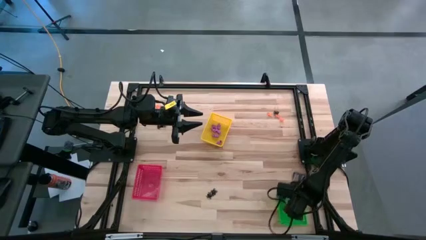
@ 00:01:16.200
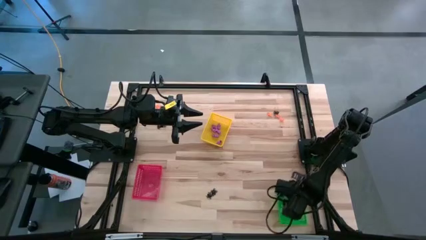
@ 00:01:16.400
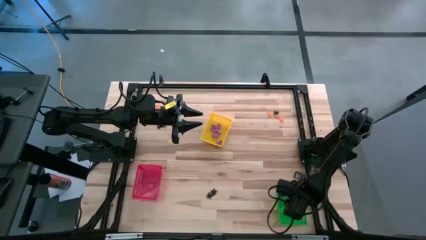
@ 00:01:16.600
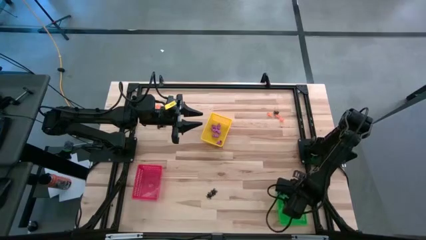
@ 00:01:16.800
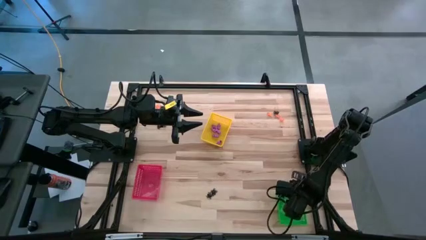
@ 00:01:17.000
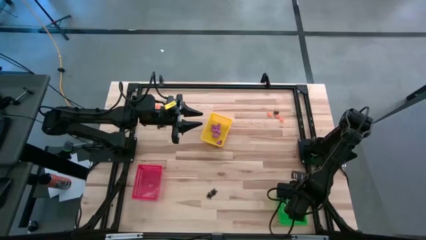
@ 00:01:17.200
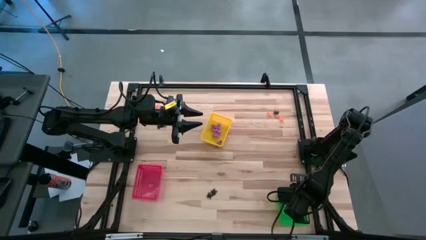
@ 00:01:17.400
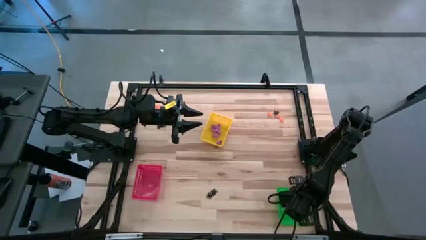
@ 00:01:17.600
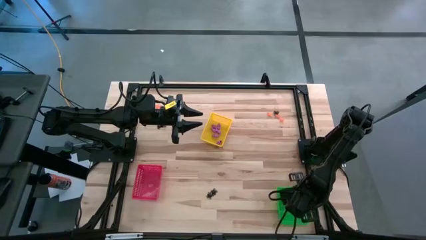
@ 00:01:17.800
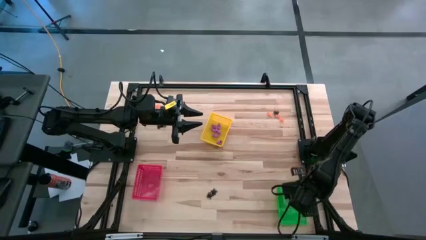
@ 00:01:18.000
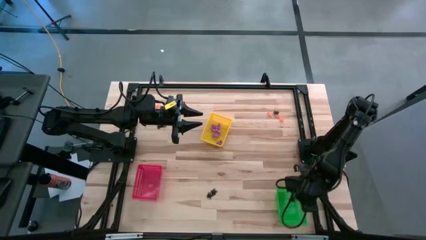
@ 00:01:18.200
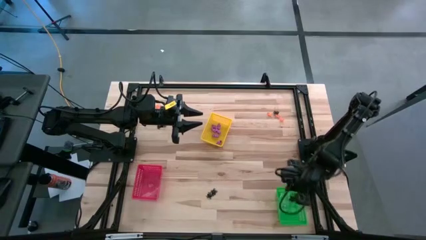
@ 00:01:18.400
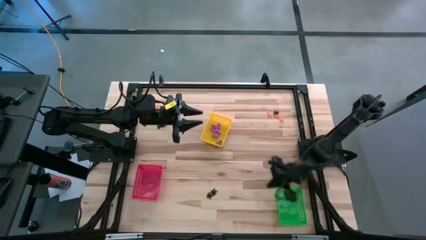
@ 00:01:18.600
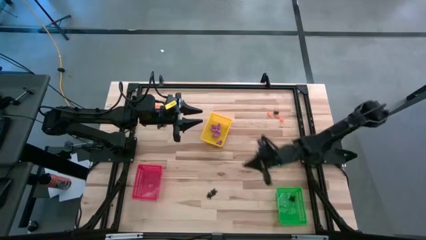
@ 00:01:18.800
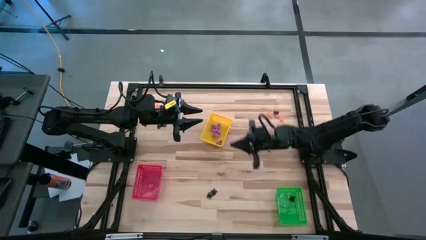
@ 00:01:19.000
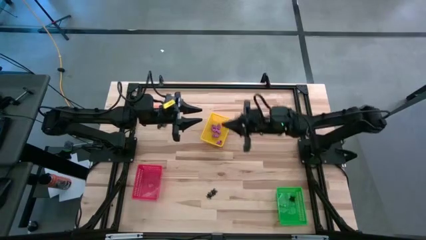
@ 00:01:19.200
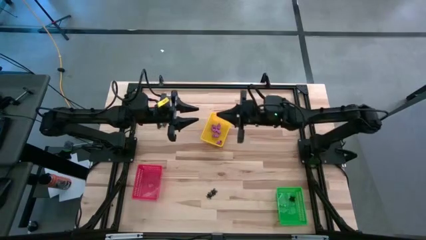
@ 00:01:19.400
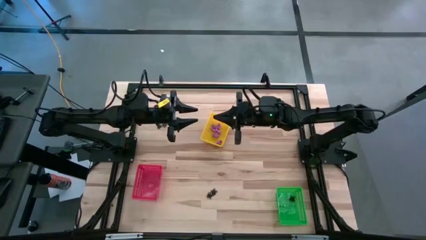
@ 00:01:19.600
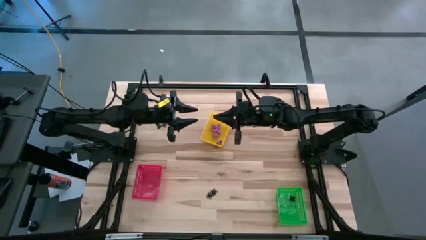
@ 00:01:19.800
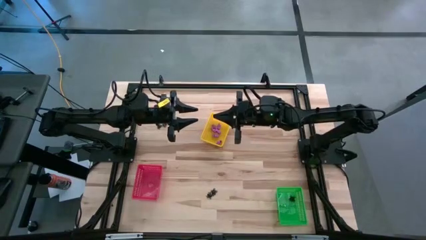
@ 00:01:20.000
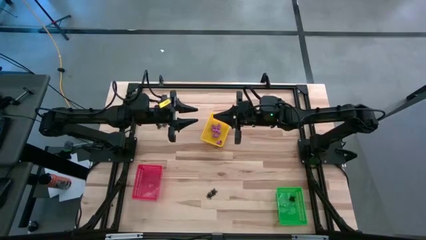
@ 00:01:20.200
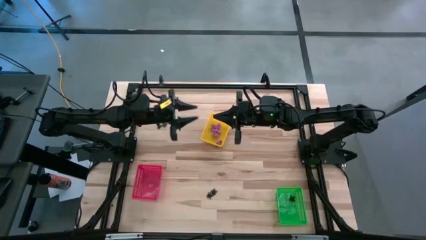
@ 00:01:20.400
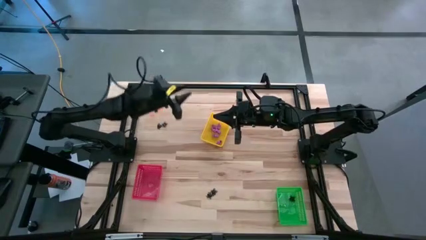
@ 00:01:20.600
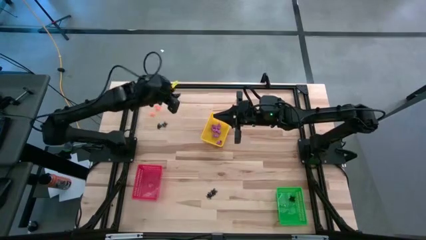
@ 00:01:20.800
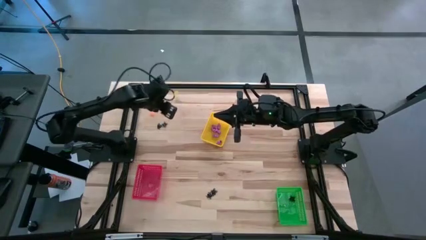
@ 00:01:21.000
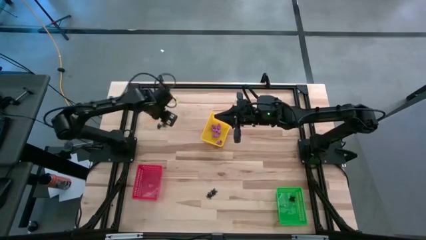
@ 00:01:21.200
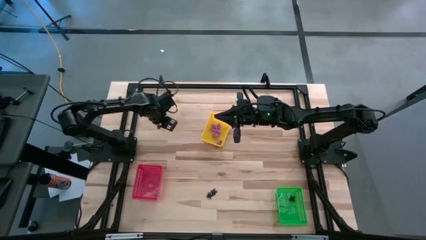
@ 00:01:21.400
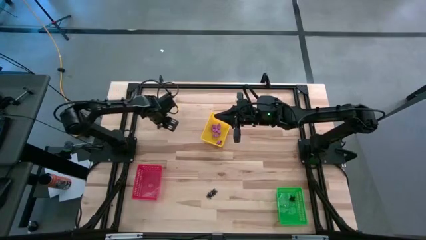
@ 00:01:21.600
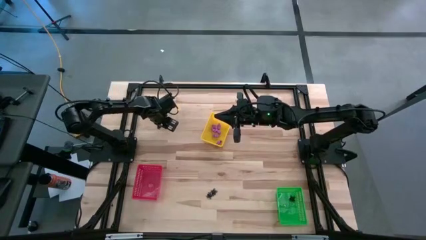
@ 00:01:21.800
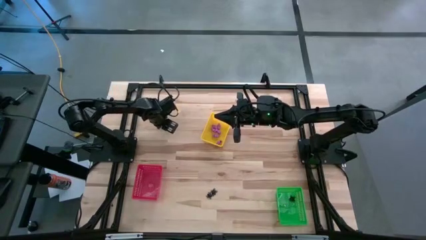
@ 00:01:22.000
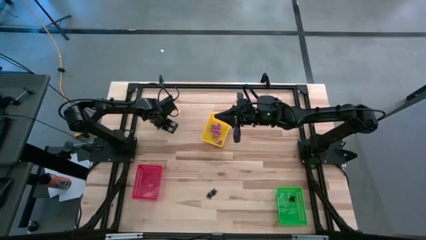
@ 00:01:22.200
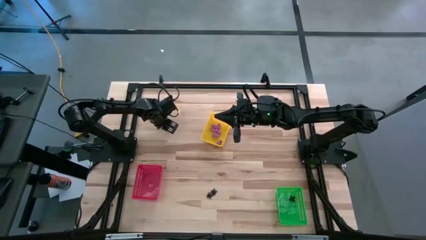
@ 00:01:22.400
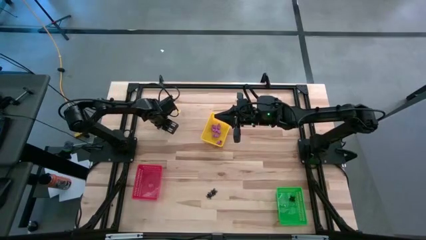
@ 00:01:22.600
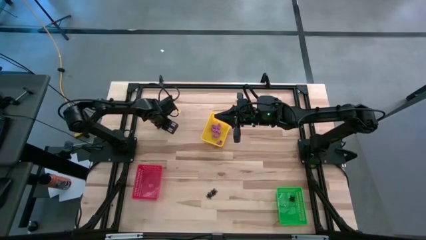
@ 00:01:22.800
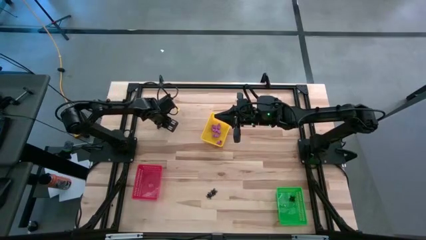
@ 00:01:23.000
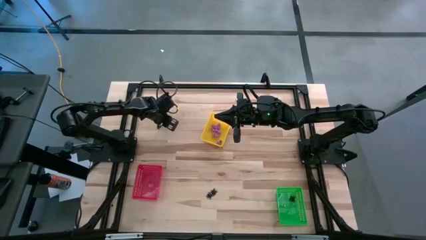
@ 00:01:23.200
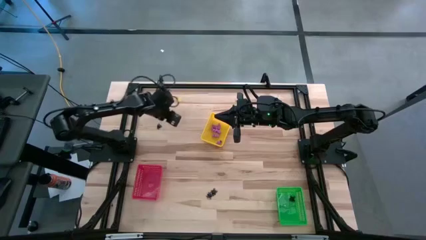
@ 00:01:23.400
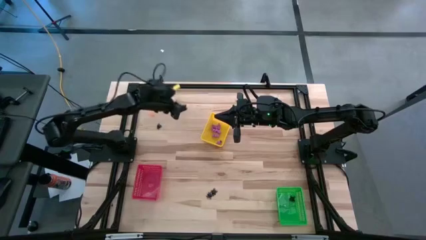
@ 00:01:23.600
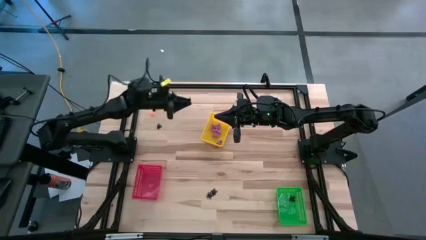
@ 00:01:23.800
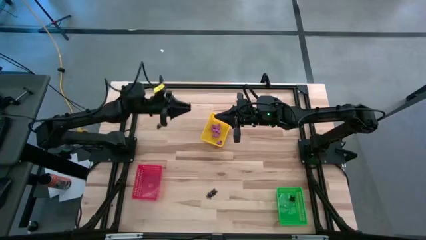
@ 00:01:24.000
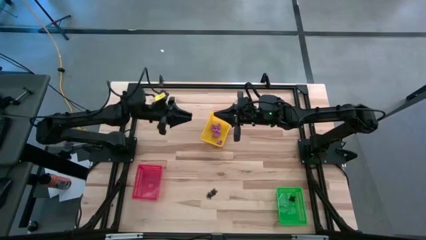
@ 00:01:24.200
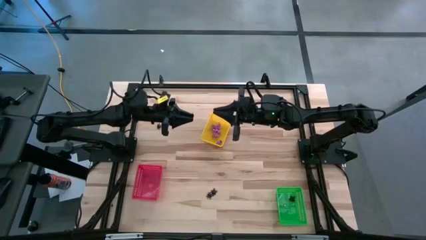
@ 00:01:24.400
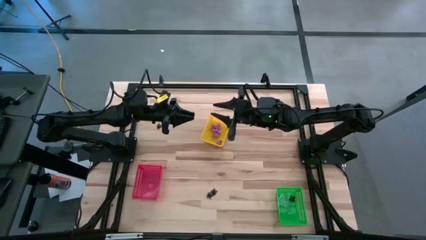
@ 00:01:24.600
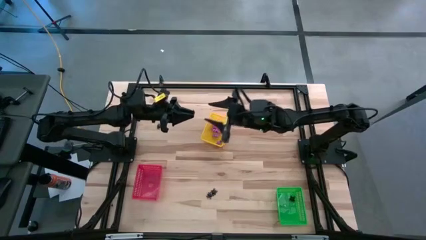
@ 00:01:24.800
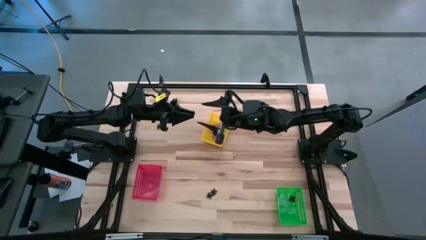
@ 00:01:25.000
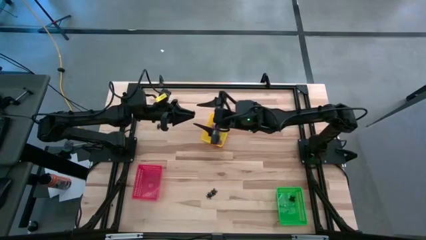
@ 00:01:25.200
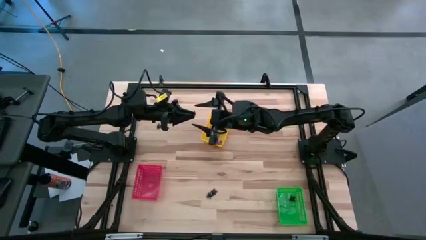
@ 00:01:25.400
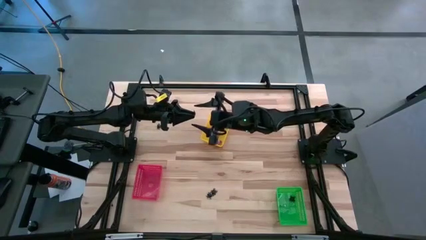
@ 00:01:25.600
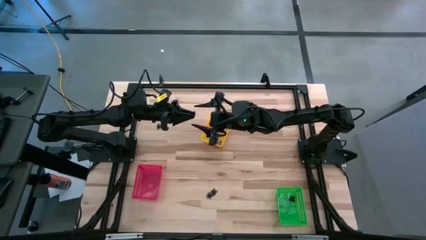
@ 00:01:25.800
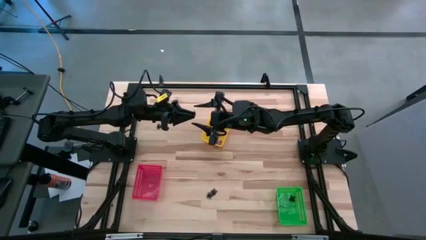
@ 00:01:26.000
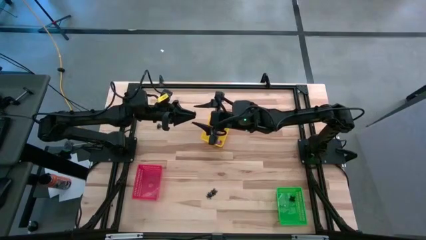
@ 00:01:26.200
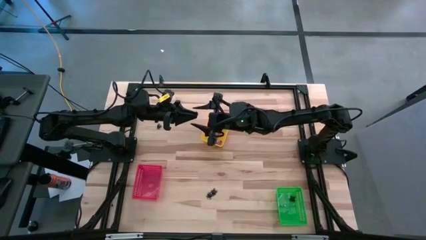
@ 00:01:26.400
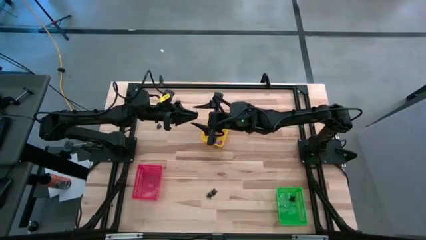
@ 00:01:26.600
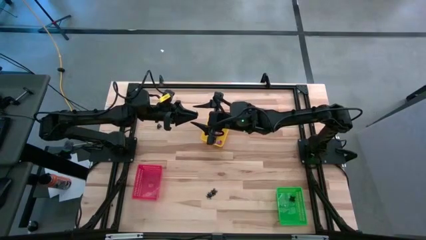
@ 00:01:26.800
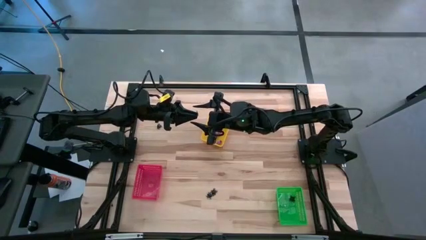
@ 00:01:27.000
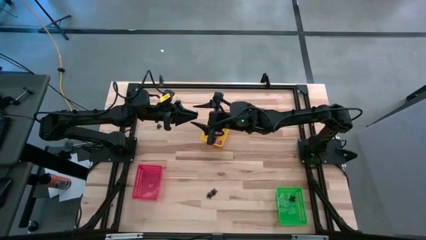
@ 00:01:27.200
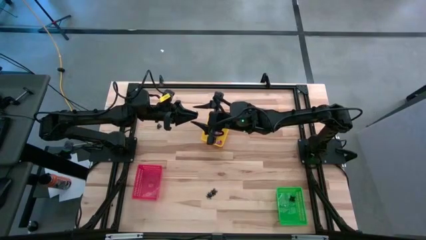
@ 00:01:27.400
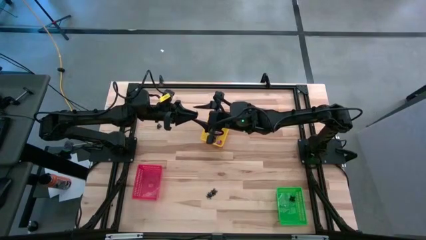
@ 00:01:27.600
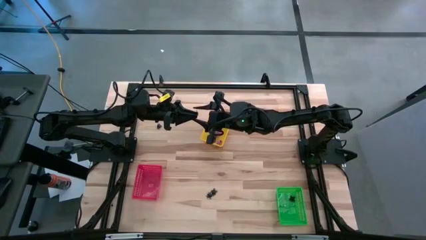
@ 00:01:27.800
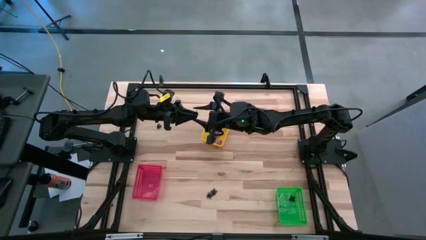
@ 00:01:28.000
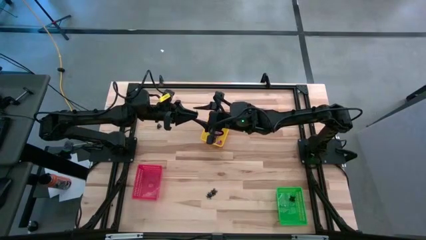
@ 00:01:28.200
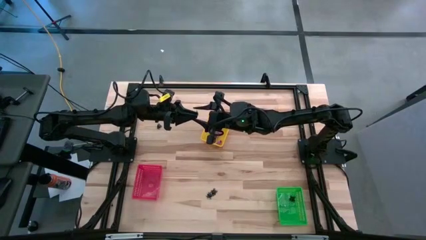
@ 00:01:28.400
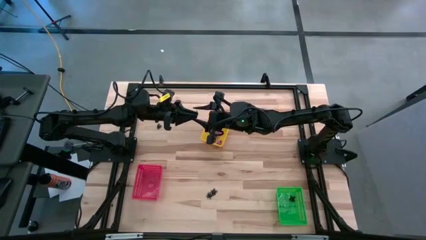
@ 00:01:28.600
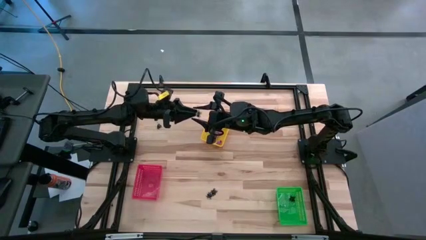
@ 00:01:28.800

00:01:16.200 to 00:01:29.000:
Task: Sort Halloween decoration
Put the black spider toy into the green bin
